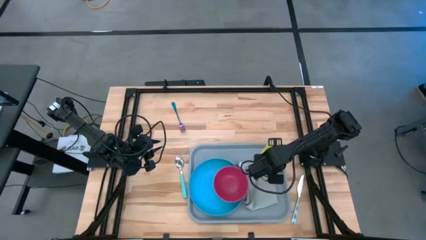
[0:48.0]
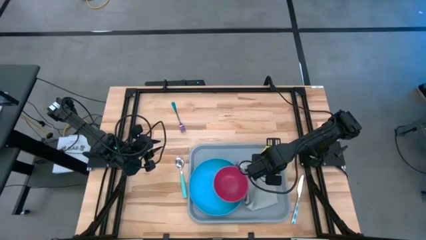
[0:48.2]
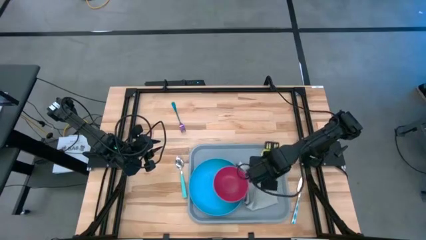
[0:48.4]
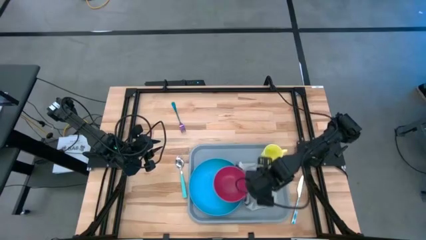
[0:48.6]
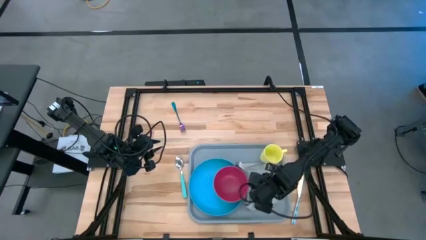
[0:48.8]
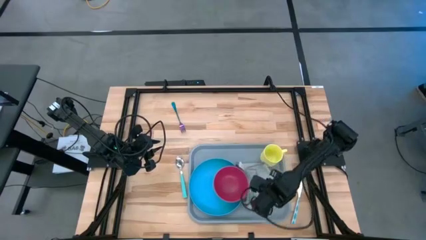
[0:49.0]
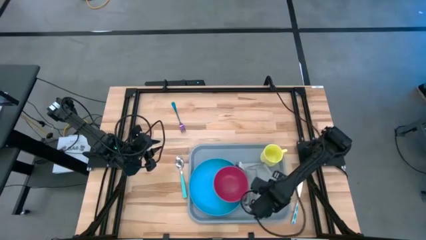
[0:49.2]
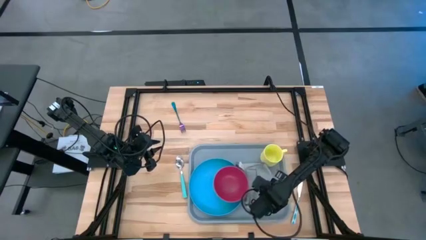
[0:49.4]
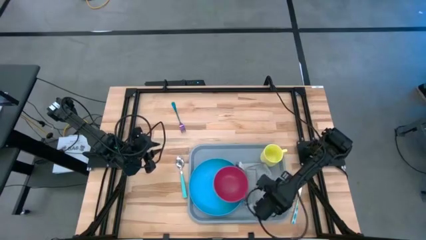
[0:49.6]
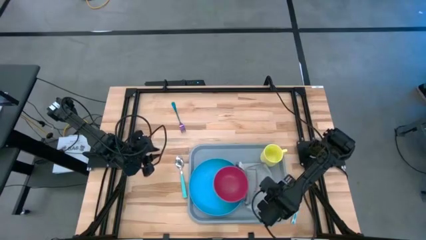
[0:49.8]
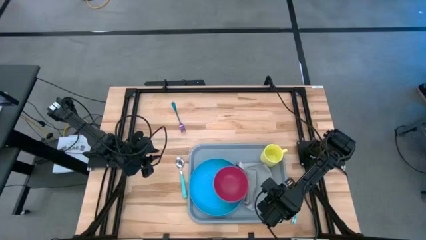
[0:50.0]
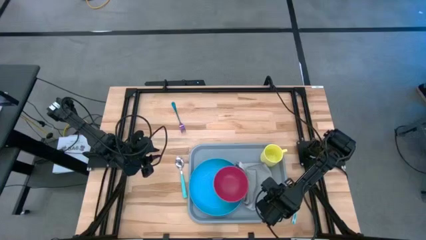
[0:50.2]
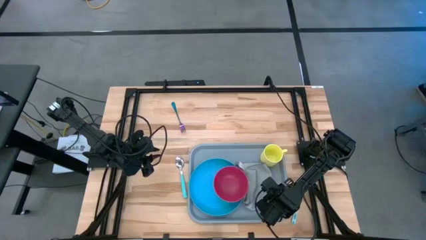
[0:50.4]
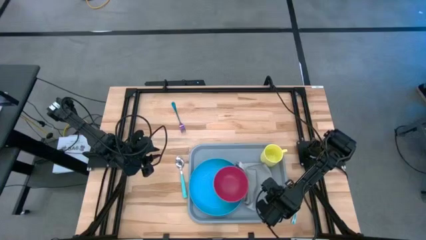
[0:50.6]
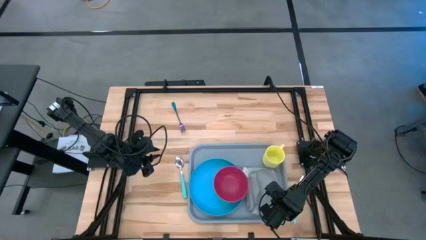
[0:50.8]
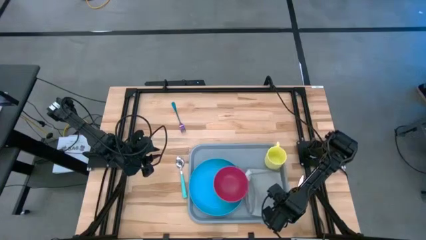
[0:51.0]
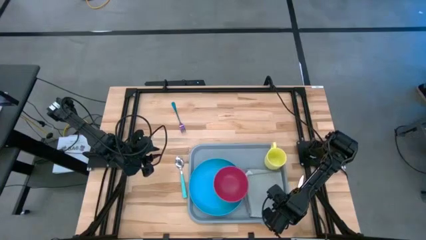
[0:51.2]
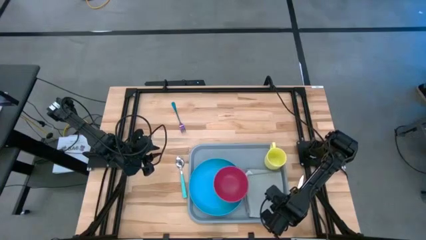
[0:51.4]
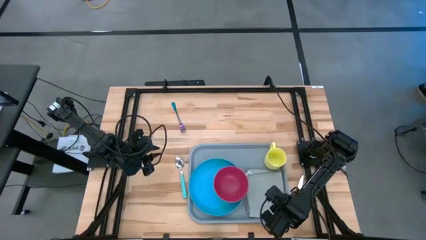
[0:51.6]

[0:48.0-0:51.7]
Task: Set up tray
Adjust the gray table napkin

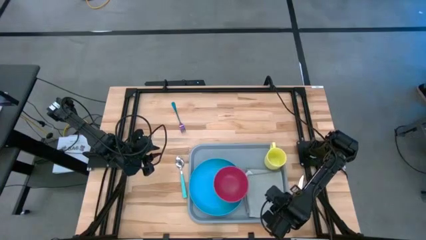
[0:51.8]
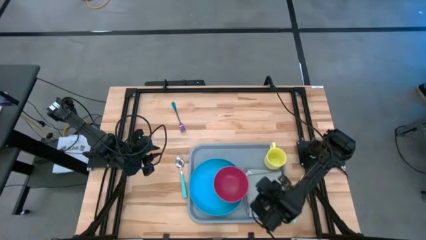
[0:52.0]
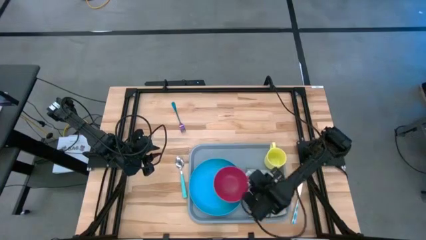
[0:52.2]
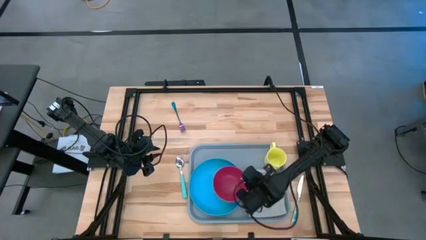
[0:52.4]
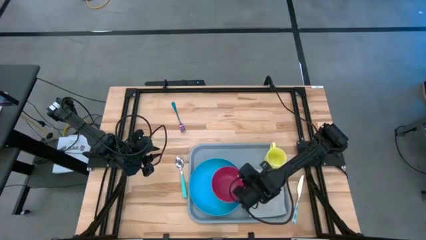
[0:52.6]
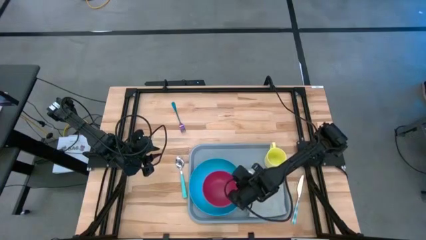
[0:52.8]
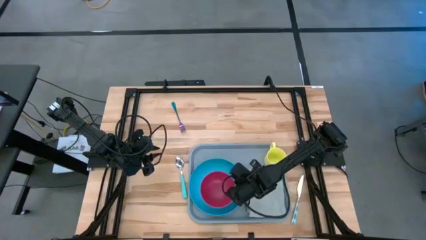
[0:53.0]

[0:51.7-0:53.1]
Adjust the red bowl

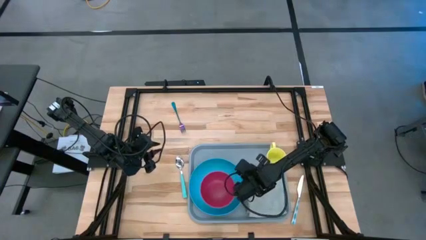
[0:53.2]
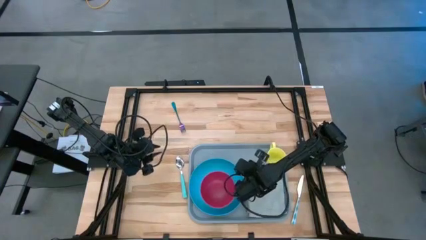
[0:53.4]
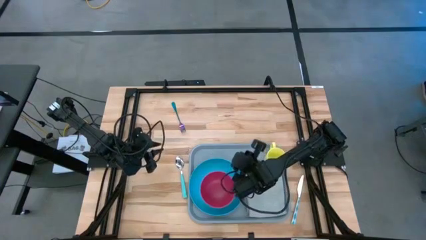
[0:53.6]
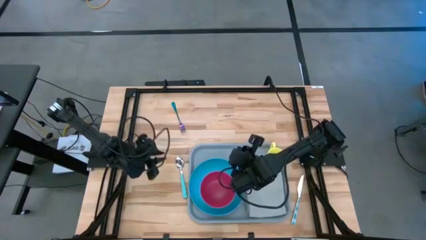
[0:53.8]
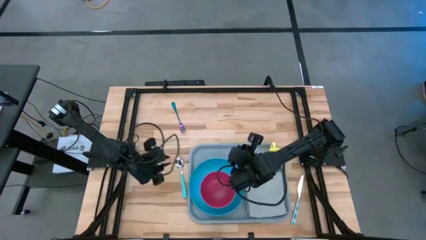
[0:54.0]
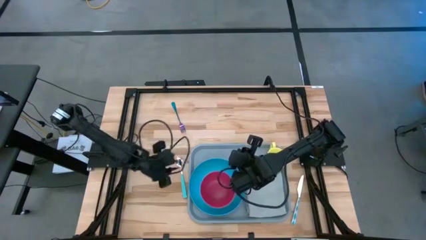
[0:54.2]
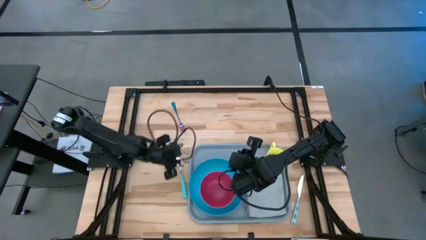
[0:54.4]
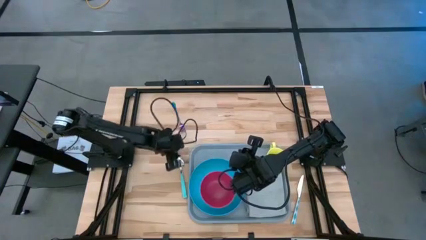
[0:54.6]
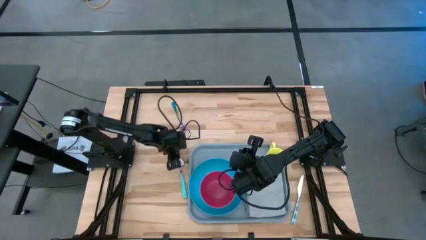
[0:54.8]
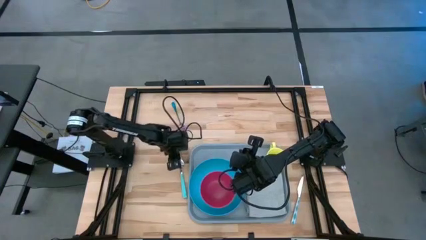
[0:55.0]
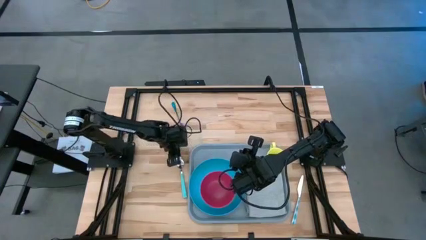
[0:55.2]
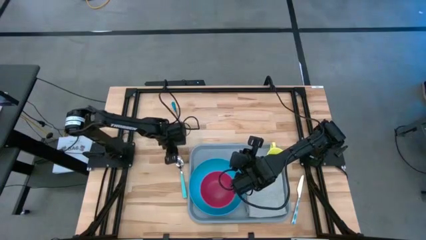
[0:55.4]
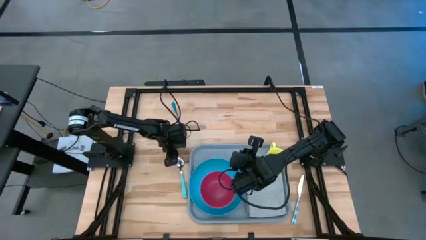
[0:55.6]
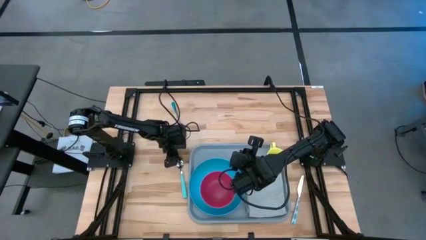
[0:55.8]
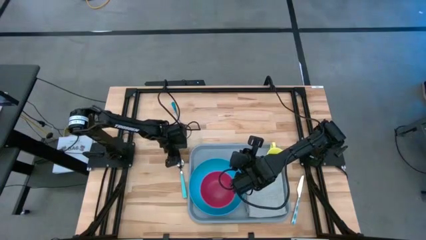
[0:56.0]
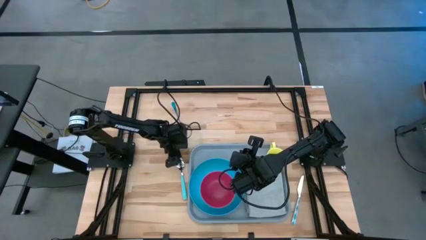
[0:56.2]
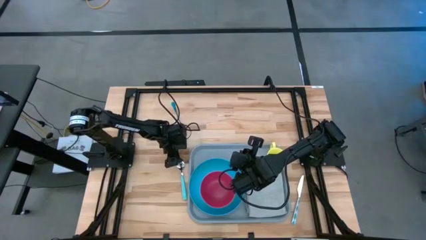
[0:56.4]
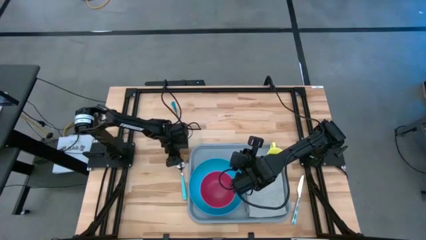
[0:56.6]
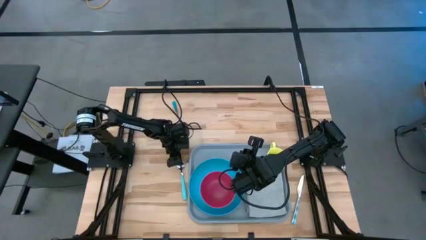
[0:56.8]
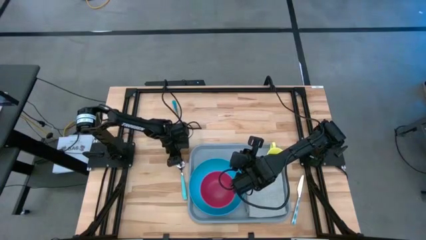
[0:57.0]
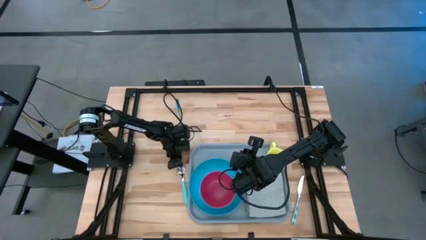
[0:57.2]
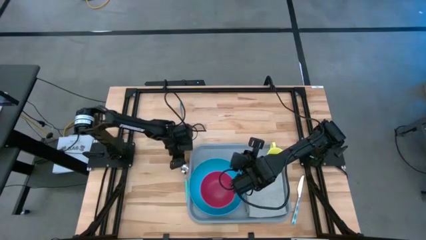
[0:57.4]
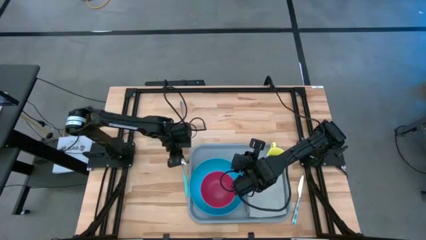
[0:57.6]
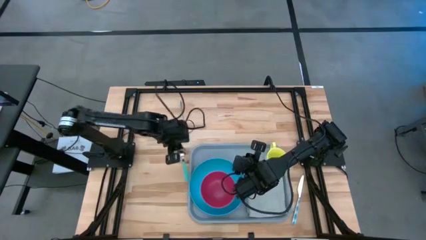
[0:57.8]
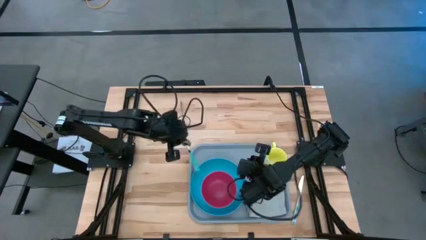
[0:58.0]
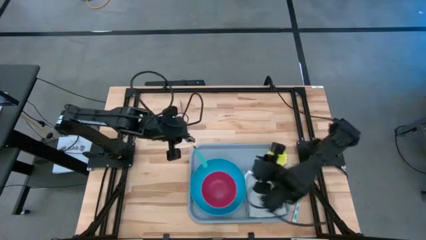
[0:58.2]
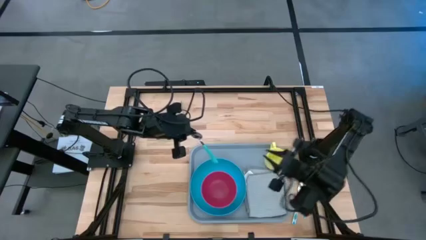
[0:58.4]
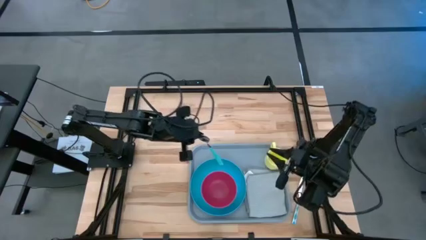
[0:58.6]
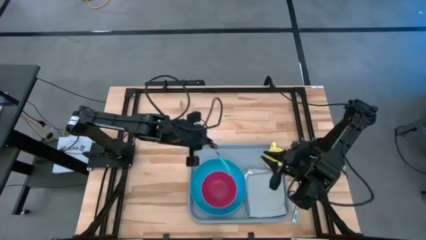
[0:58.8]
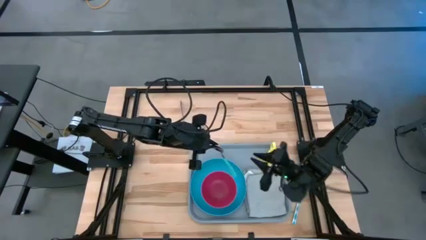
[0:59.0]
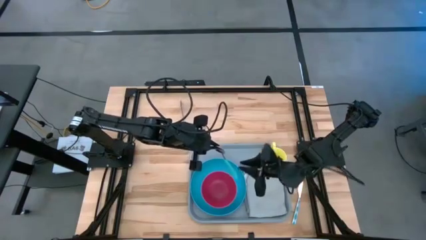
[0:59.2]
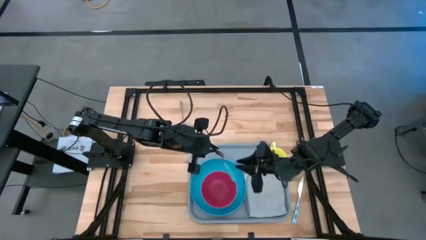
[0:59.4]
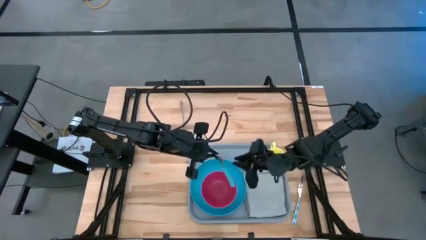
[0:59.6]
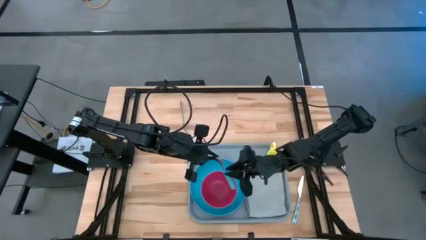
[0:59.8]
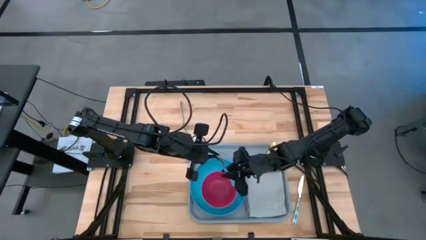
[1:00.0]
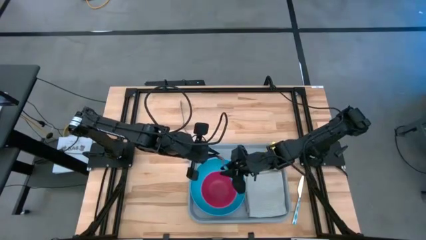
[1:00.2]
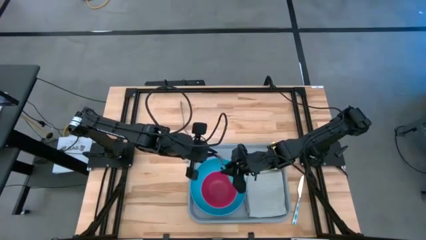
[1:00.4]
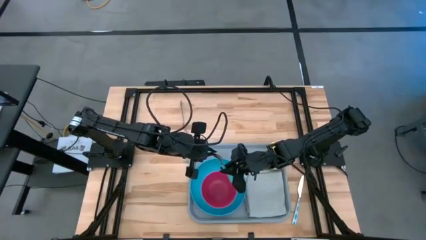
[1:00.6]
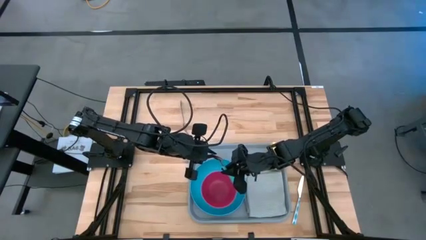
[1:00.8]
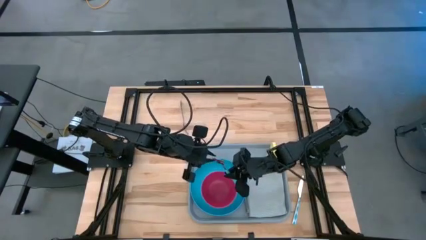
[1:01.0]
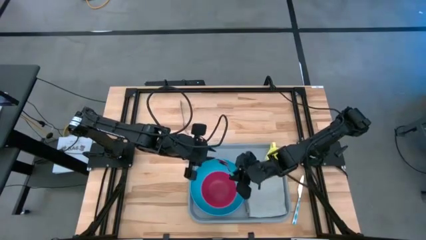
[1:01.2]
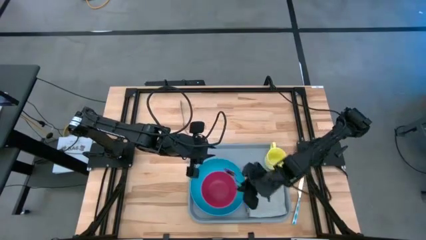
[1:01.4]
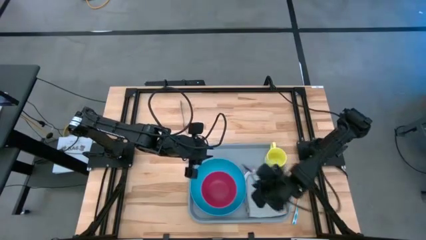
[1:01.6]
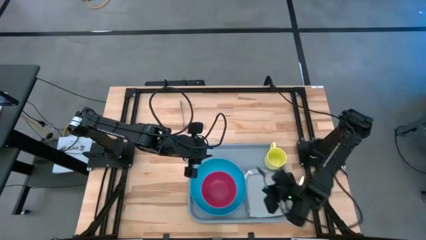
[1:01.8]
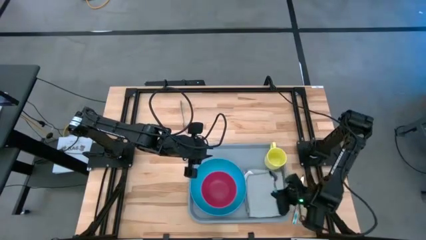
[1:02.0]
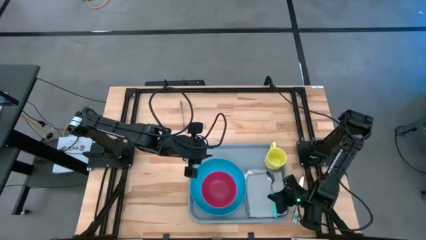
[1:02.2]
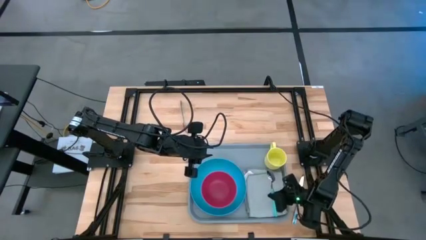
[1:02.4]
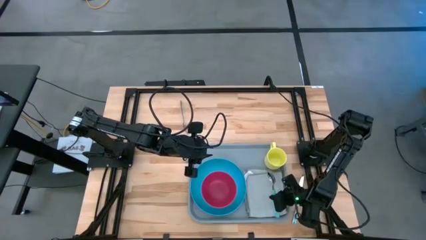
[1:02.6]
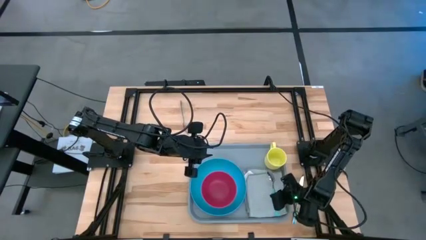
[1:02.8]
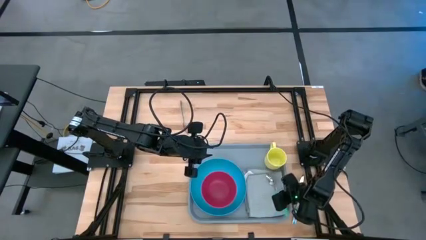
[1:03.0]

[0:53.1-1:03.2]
Put the blue spoon to the right on the gray table napkin
